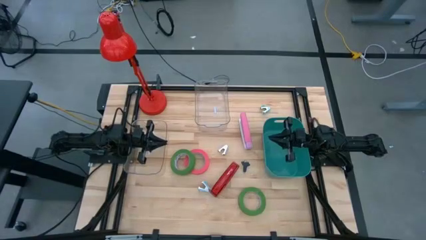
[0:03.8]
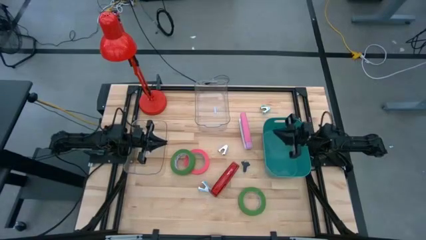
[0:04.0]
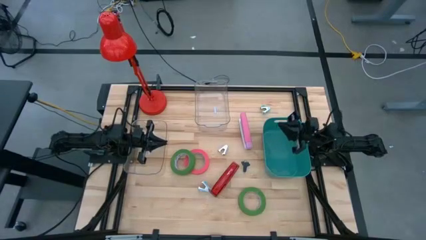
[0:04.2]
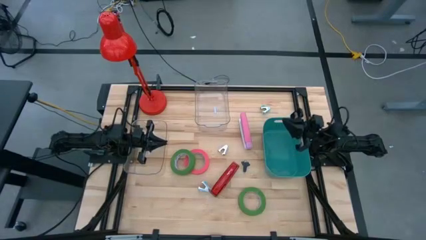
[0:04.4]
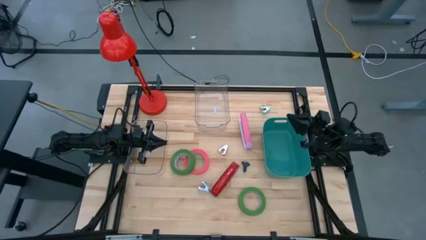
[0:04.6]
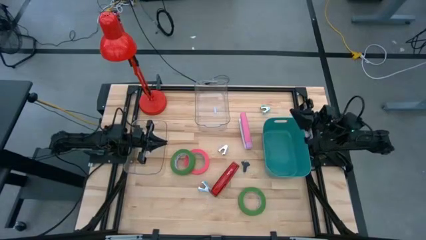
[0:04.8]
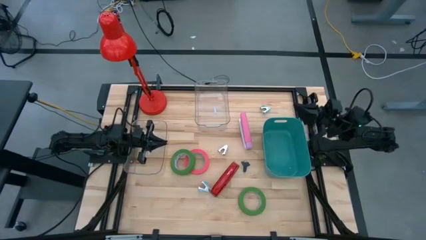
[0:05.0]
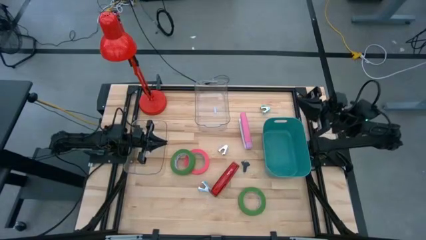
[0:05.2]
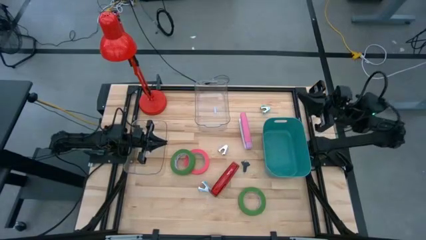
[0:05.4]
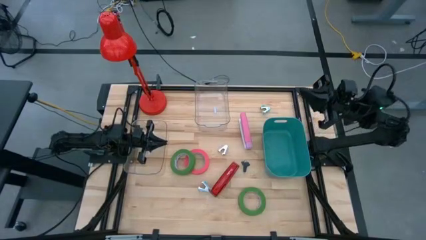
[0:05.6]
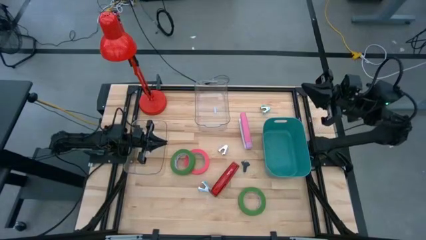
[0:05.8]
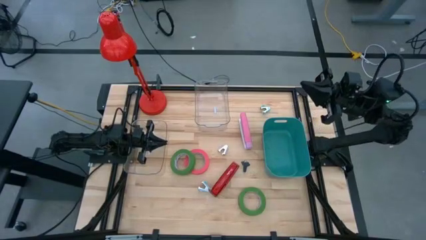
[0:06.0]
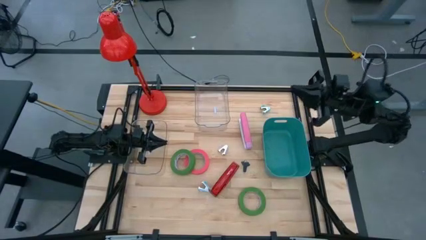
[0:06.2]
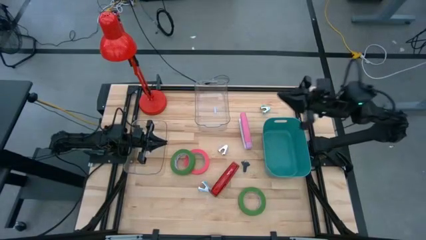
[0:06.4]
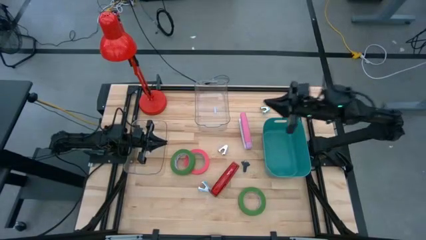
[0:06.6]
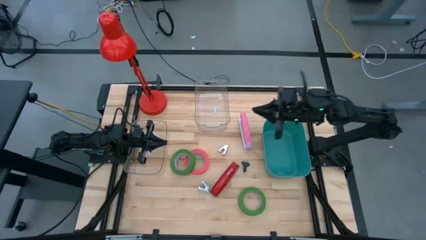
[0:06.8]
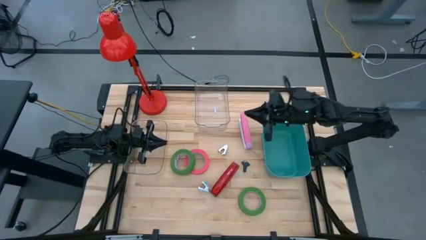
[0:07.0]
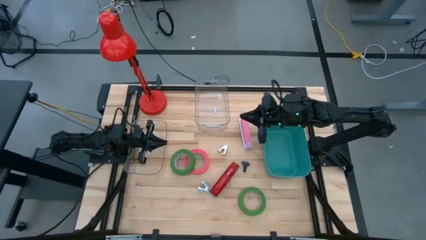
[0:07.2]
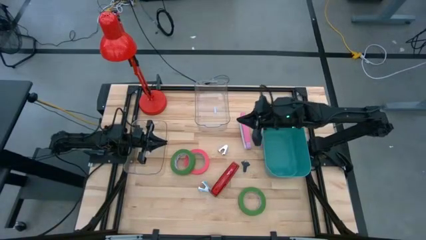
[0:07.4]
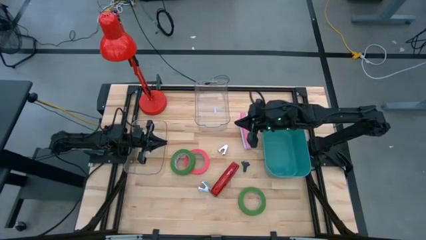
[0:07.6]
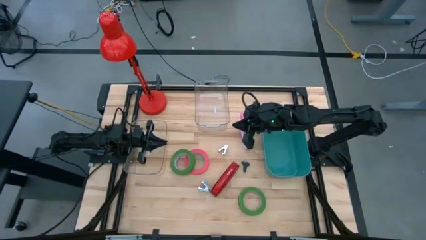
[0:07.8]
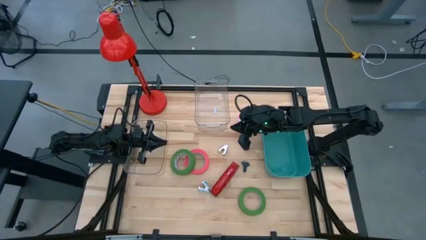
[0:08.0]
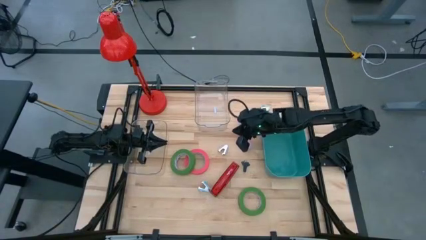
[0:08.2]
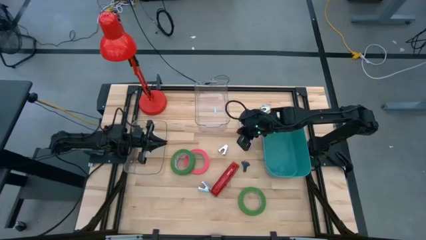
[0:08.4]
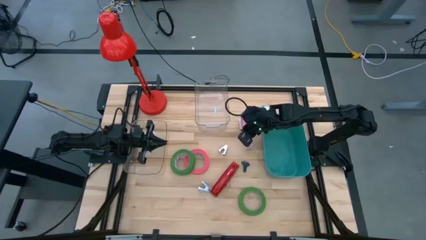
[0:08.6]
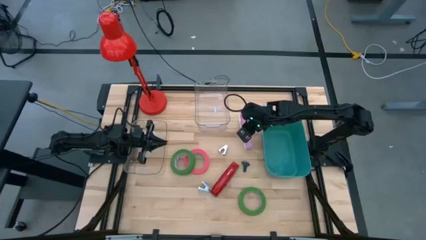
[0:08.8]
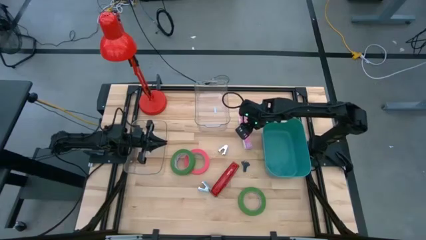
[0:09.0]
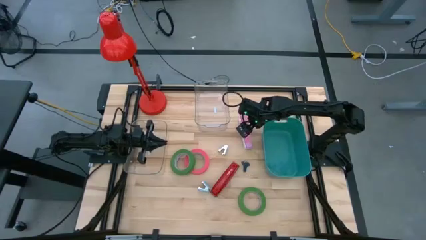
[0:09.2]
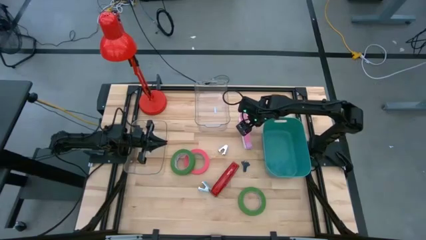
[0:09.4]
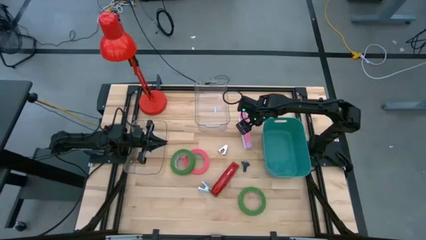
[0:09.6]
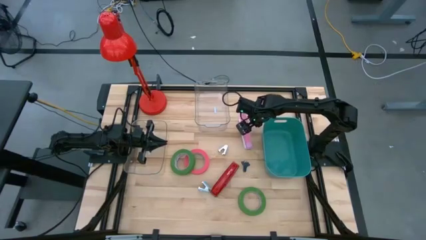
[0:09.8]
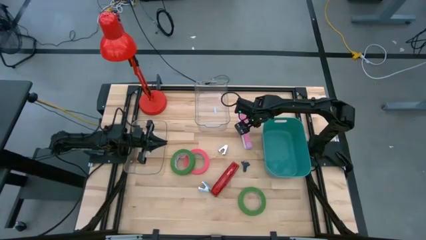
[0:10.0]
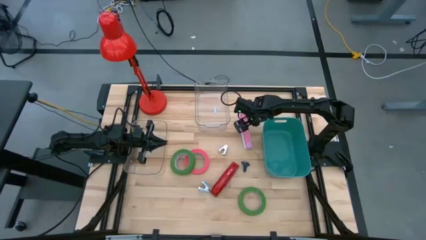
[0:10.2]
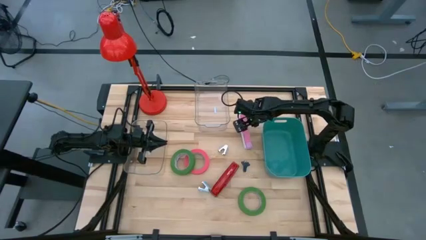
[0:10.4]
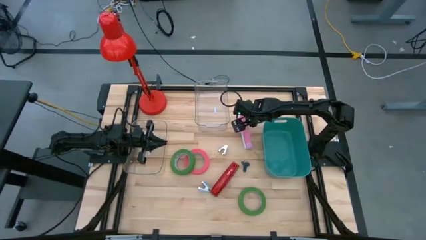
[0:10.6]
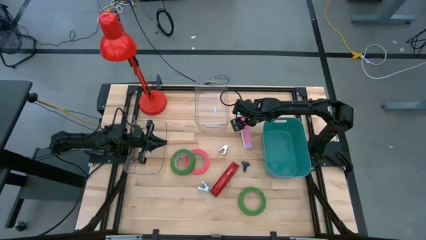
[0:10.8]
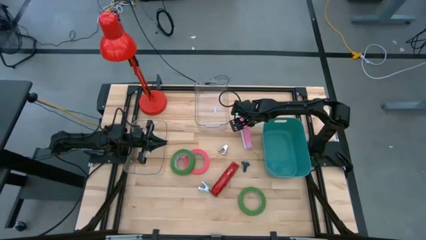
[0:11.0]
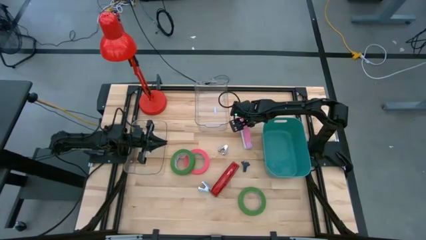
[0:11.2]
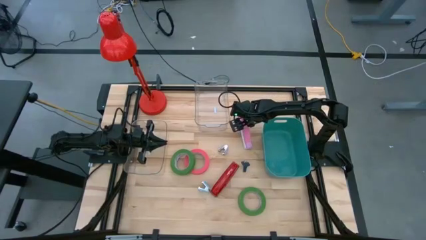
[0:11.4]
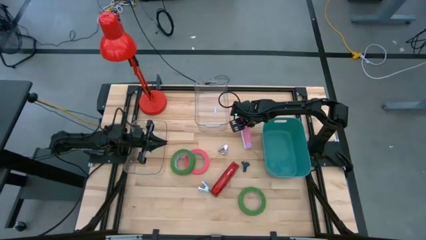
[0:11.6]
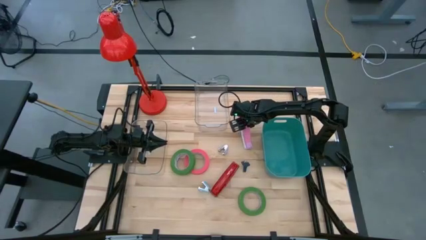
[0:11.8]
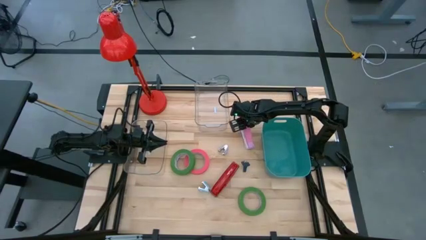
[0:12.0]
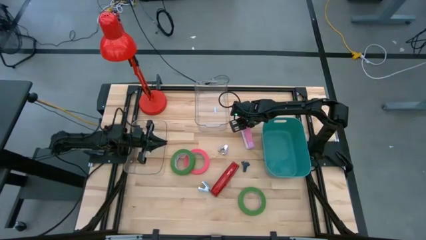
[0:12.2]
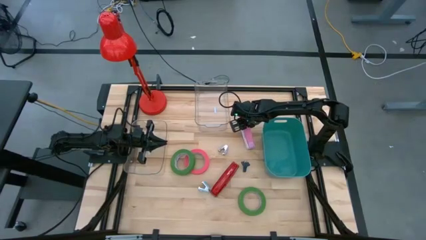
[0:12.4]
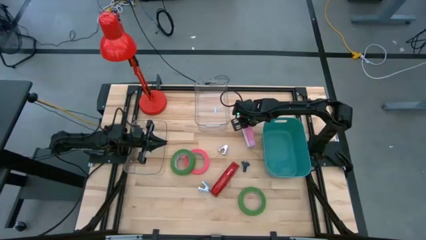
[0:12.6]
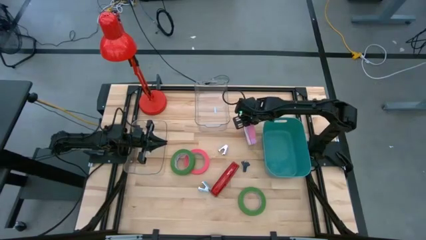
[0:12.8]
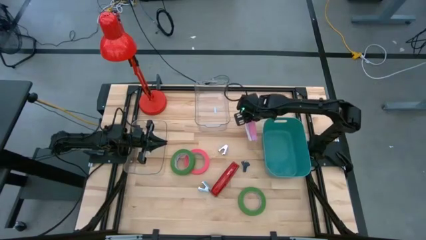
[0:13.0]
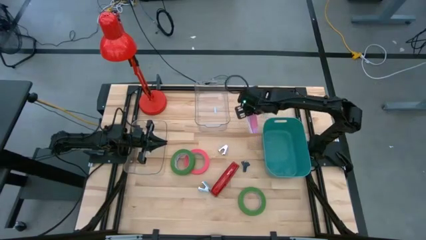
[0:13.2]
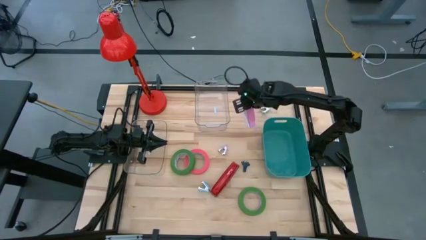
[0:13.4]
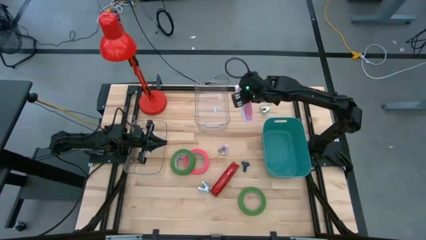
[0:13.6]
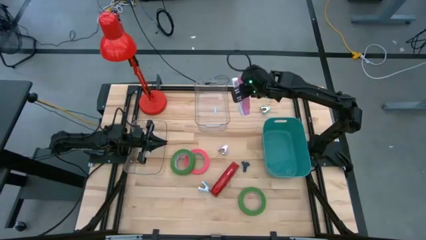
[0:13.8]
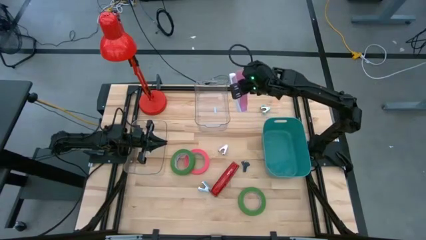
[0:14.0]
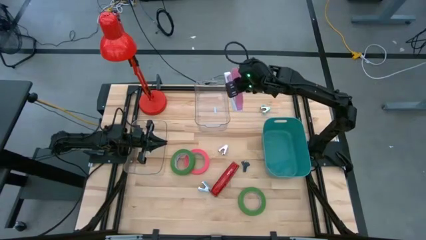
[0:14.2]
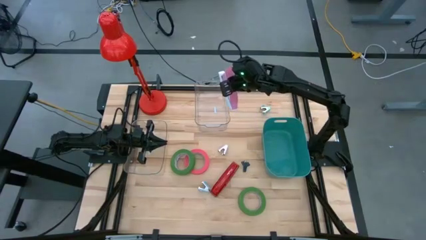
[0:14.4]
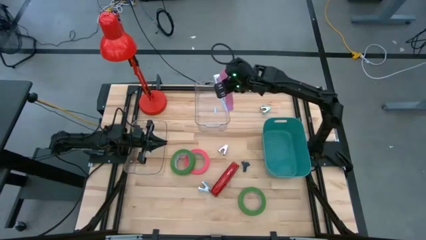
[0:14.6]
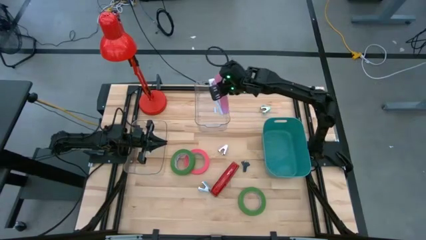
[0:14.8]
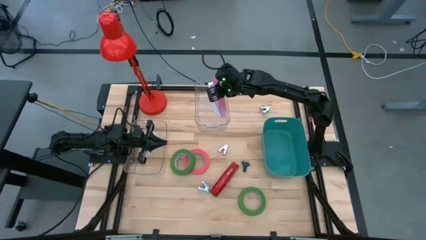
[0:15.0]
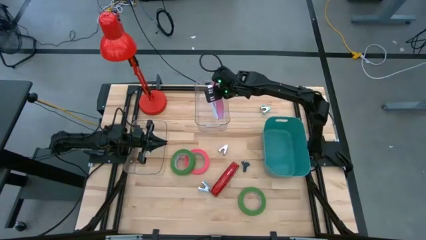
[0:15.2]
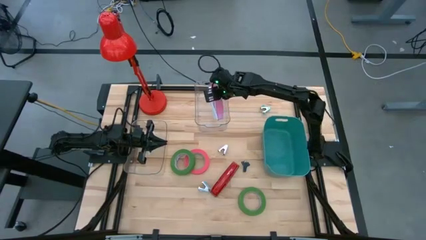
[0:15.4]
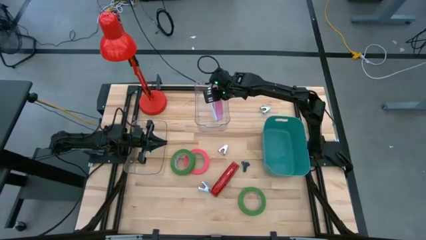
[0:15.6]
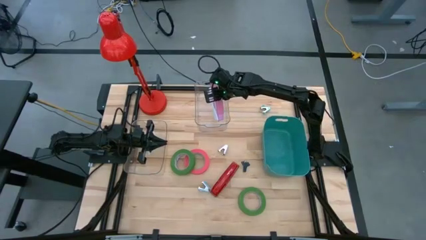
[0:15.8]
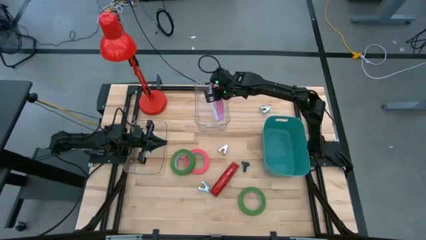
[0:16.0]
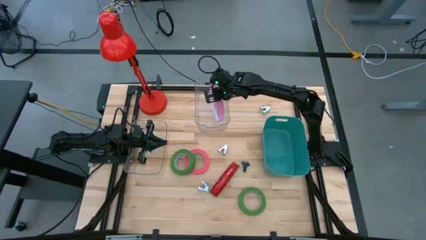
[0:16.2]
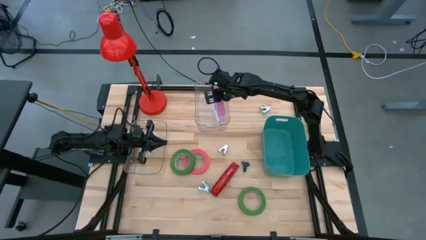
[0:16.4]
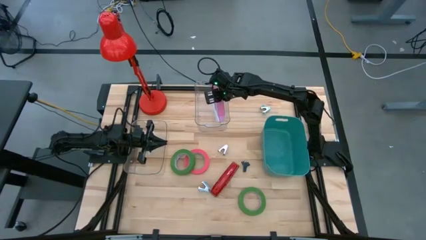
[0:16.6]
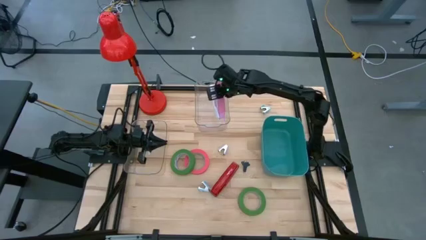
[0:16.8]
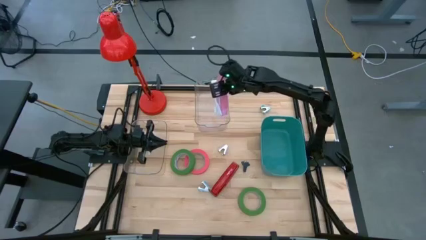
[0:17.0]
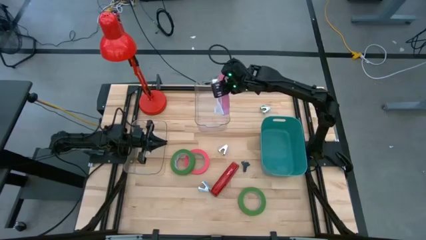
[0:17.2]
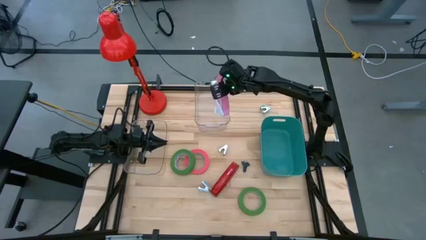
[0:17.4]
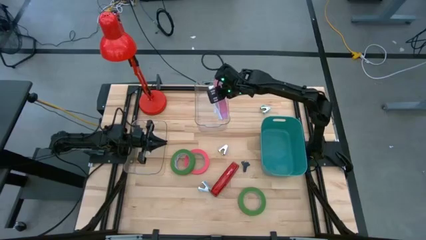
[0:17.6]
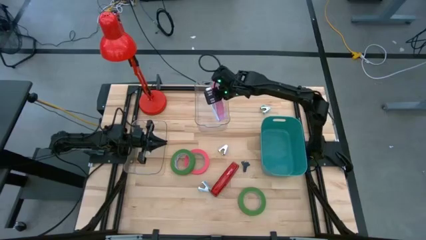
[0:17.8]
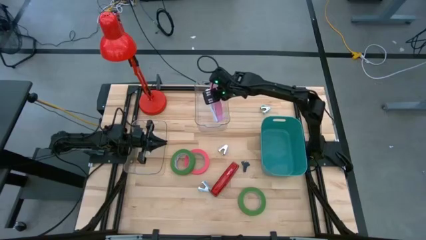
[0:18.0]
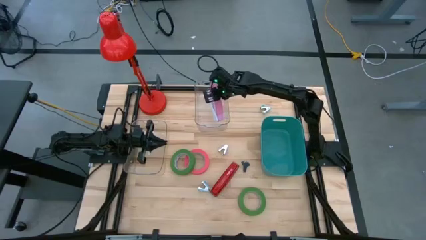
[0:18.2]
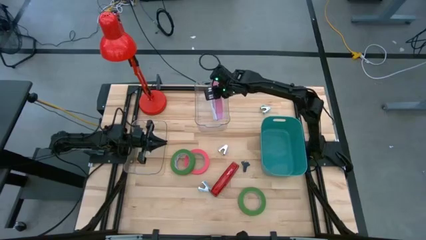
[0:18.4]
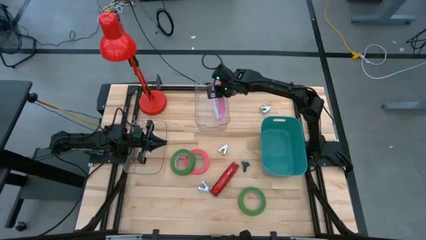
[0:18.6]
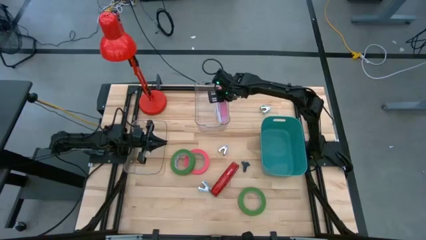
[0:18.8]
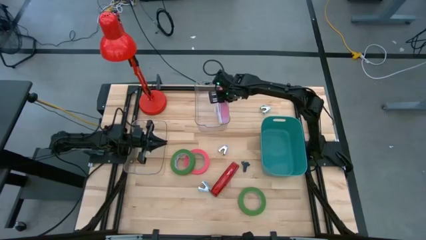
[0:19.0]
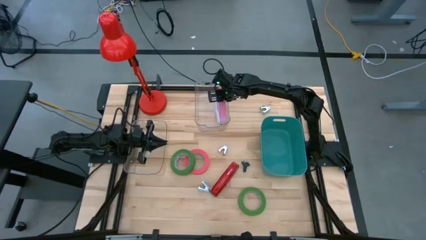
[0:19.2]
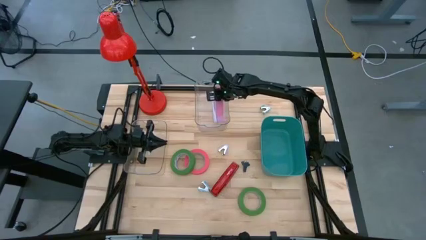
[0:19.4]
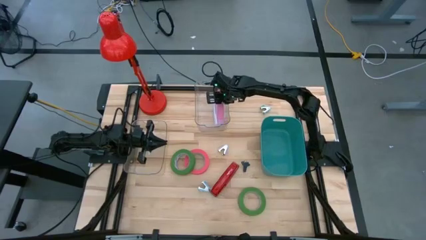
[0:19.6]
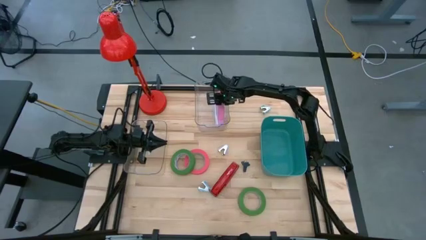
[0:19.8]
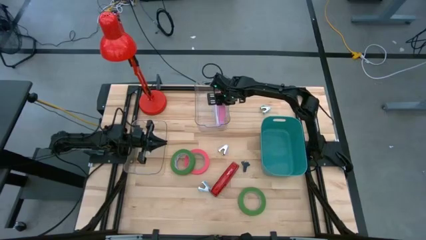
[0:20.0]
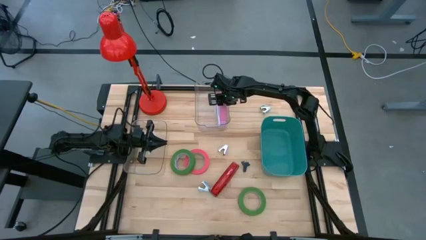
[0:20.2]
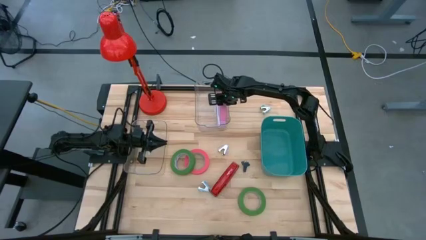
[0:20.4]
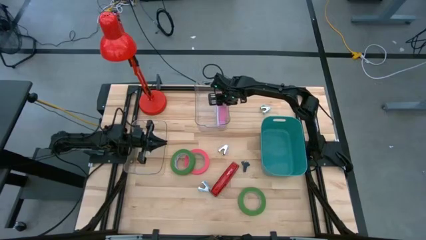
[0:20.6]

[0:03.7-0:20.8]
Task: Pick and place Stapler, Stapler remover, tape
Put the pink stapler into the right transparent bin
